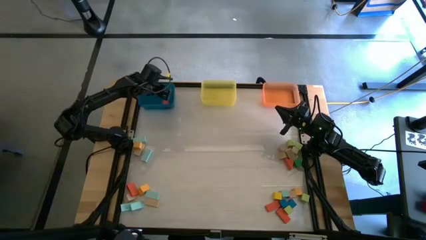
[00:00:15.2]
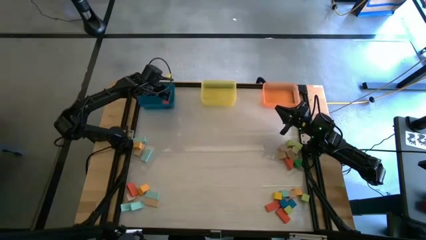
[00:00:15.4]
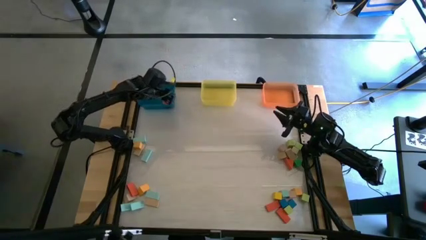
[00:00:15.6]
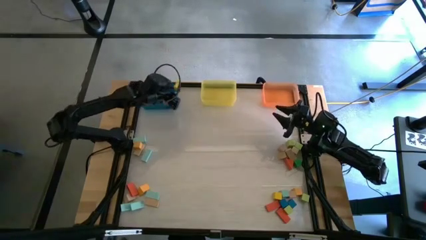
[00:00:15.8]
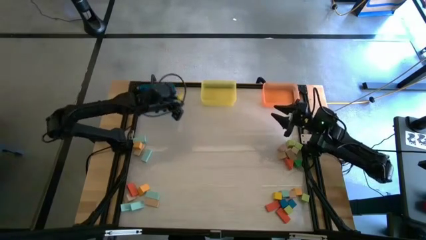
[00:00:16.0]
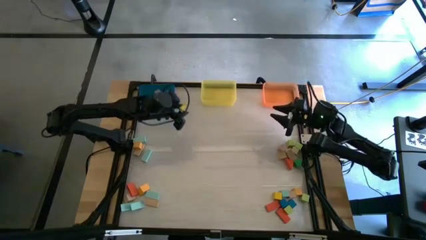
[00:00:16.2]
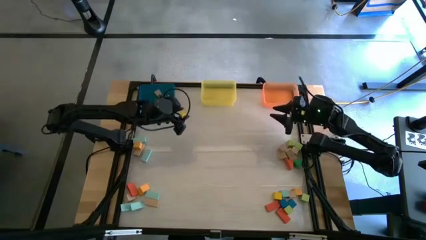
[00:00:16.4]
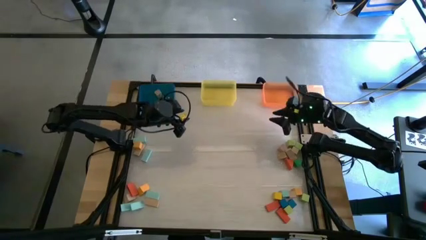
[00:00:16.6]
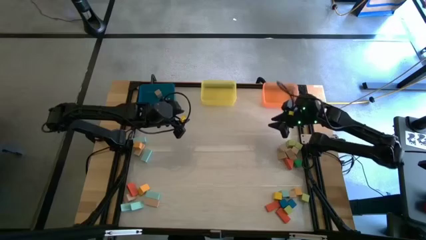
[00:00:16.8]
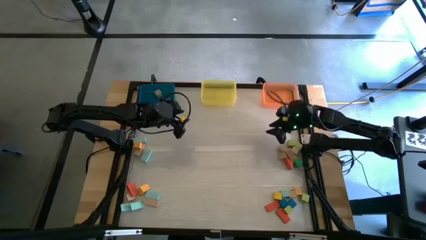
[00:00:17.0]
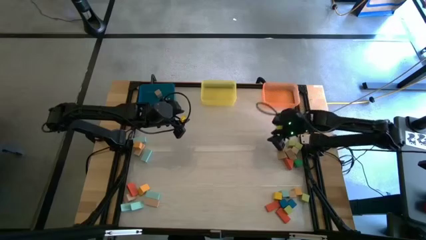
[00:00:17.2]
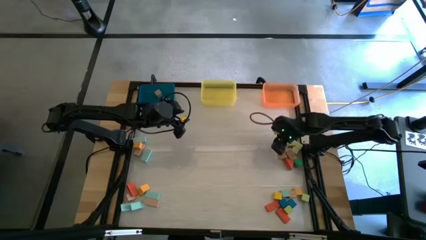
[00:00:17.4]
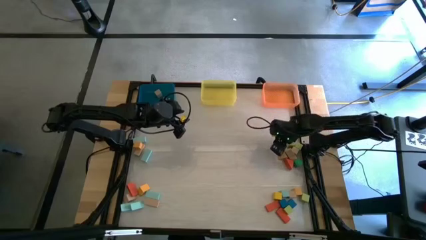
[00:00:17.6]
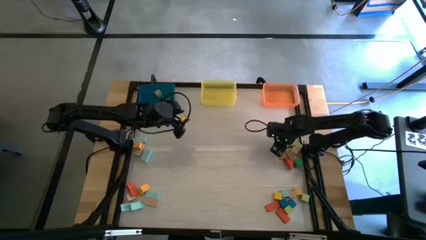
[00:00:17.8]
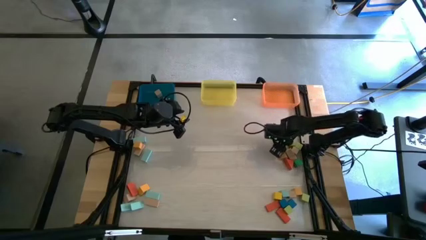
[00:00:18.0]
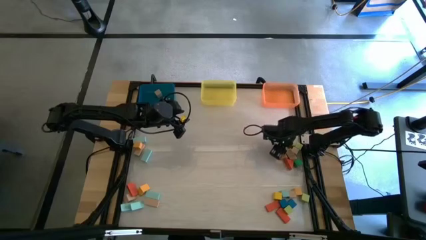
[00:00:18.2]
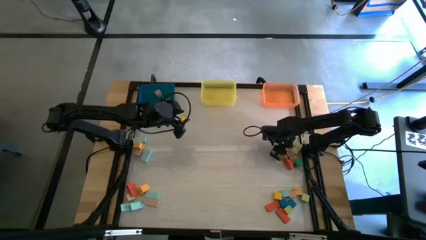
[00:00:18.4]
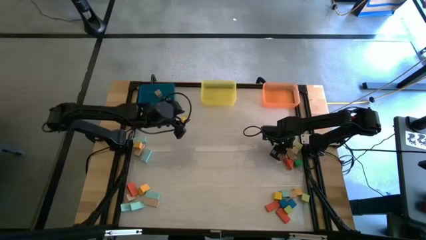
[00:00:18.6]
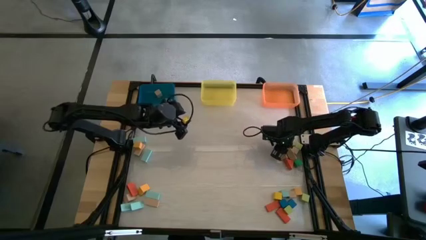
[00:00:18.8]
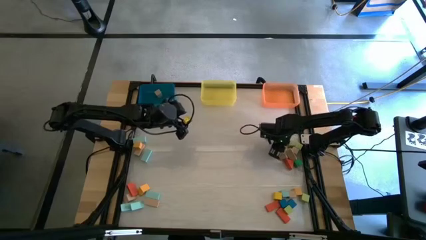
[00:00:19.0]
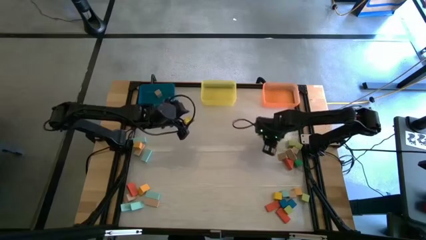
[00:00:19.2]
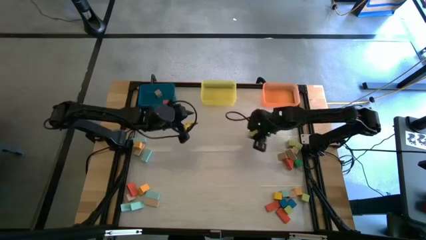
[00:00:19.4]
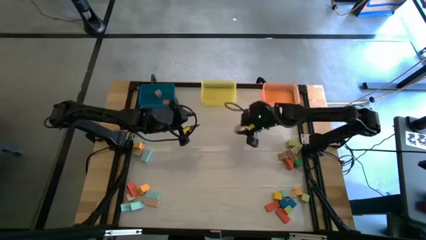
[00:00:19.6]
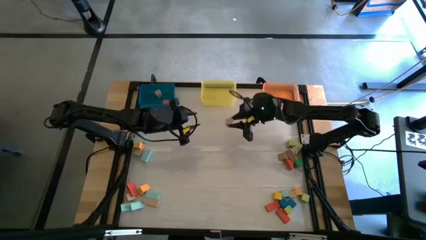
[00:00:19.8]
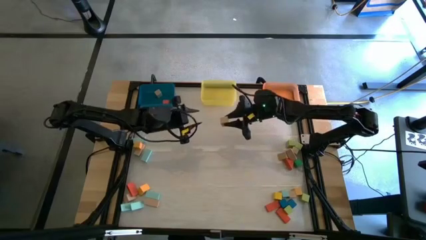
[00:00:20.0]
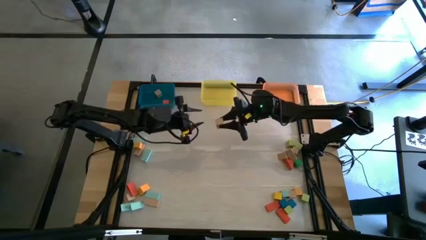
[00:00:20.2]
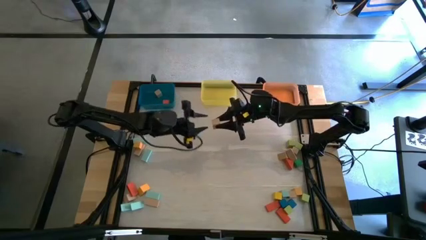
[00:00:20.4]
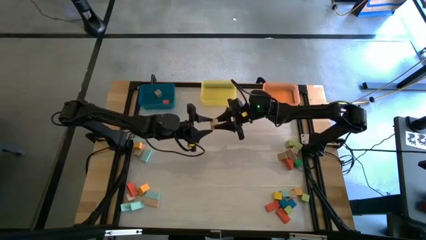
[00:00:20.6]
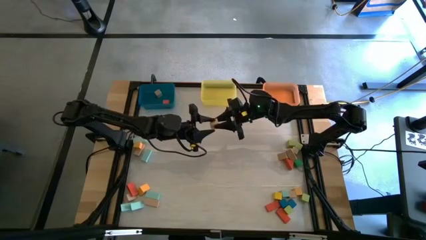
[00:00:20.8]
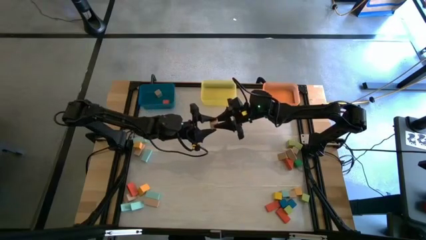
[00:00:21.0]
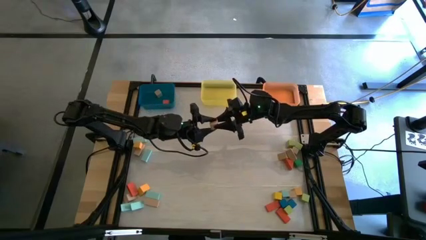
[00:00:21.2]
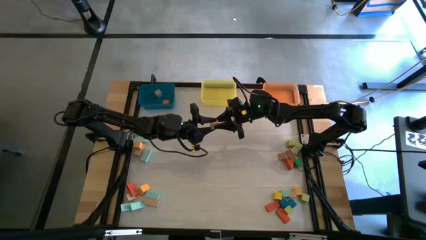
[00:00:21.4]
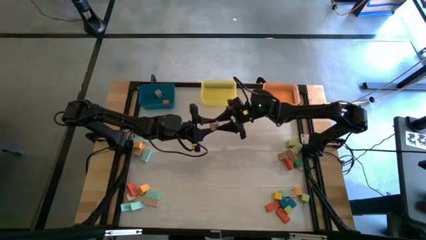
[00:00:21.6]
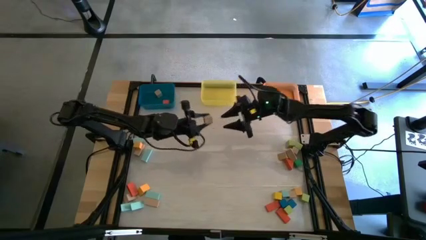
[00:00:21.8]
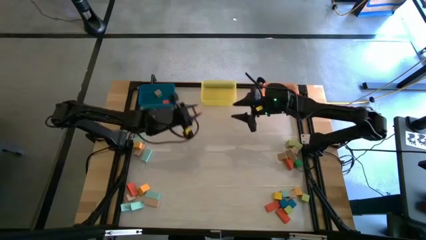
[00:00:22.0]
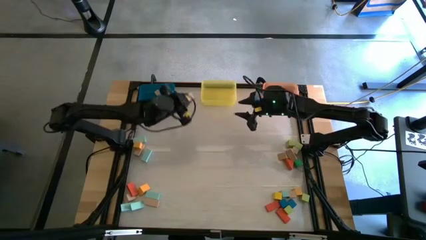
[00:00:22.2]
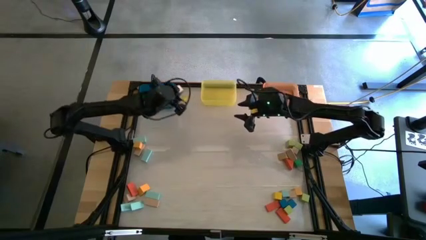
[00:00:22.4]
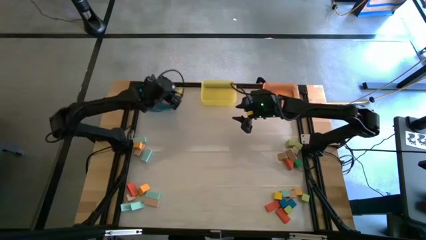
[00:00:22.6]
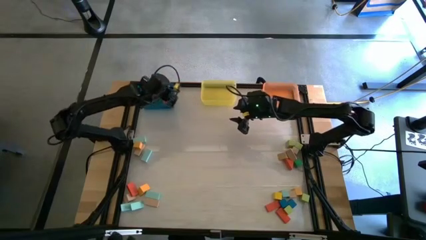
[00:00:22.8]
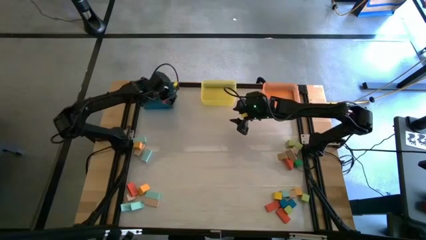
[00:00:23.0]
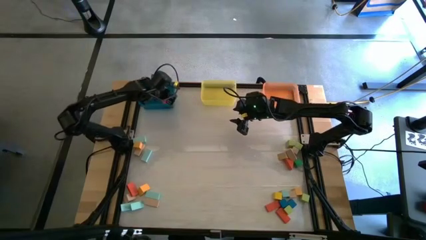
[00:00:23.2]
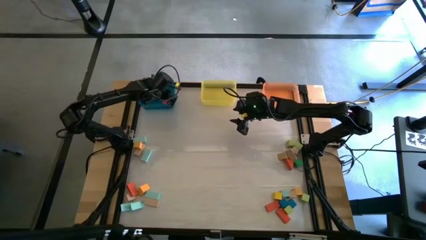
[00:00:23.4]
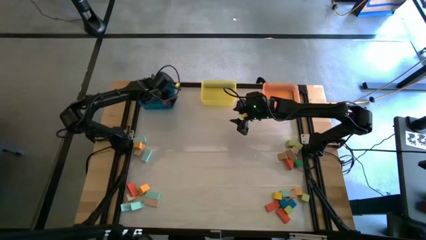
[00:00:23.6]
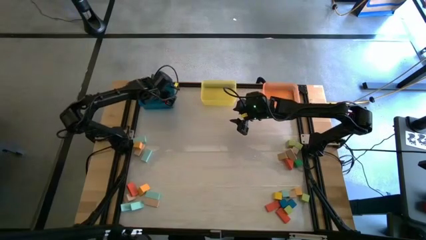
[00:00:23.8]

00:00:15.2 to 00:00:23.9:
Task: Sort blocks by size
Put the brown square block into the blue bin

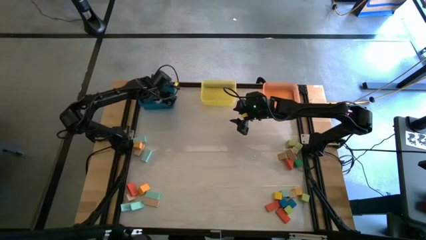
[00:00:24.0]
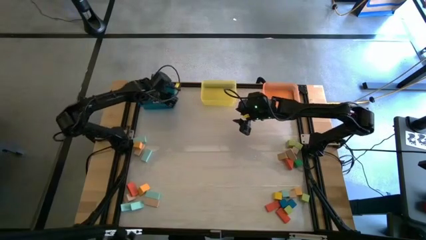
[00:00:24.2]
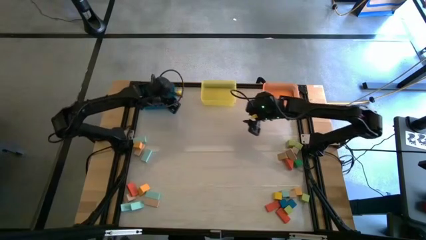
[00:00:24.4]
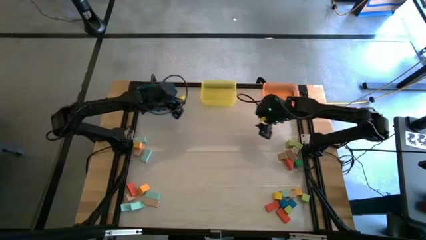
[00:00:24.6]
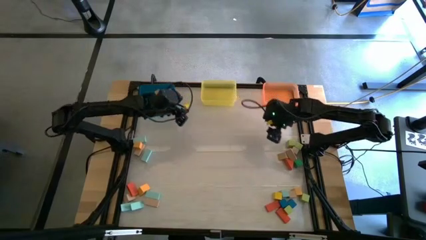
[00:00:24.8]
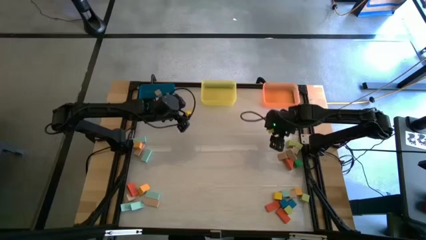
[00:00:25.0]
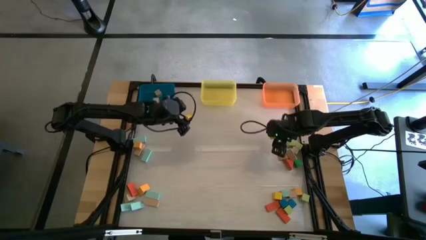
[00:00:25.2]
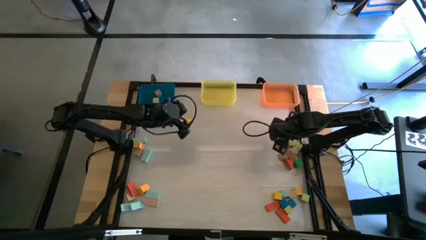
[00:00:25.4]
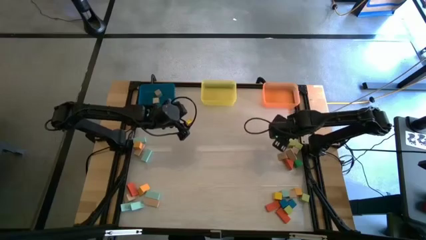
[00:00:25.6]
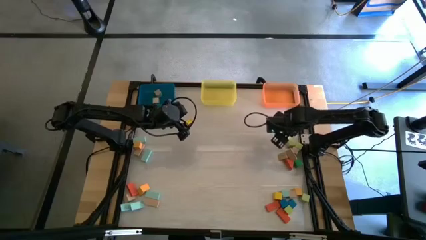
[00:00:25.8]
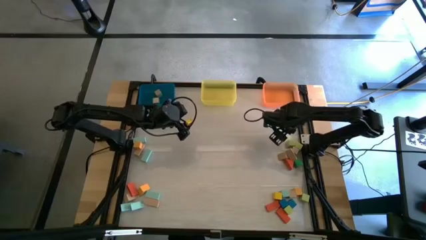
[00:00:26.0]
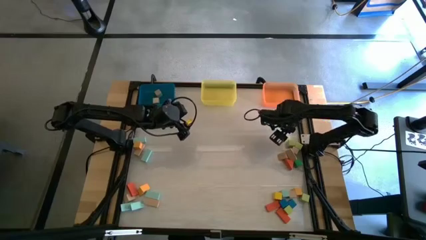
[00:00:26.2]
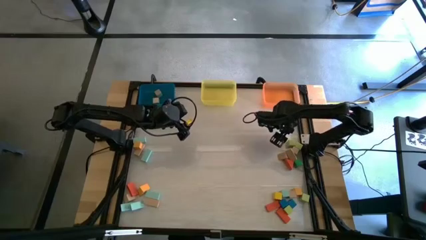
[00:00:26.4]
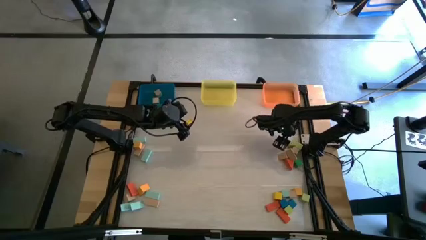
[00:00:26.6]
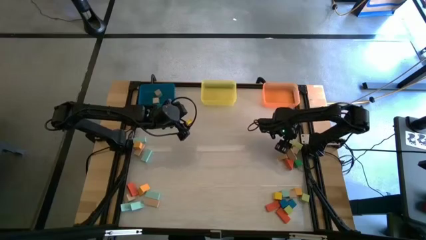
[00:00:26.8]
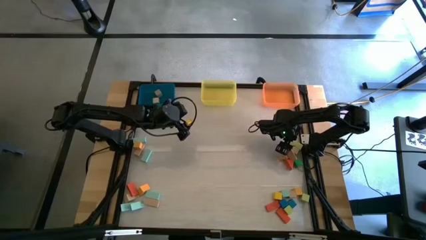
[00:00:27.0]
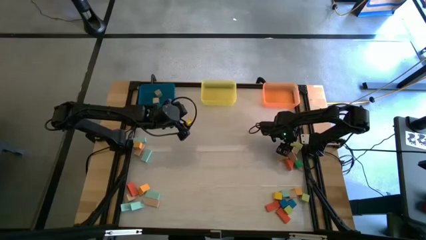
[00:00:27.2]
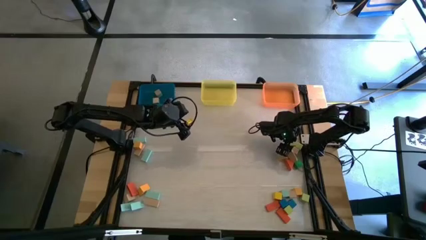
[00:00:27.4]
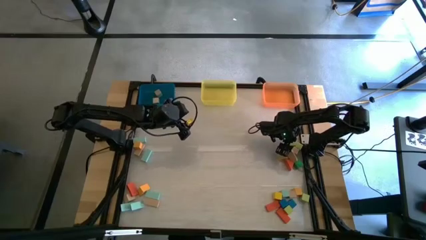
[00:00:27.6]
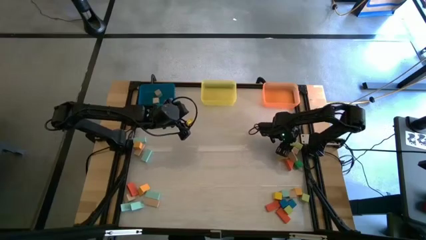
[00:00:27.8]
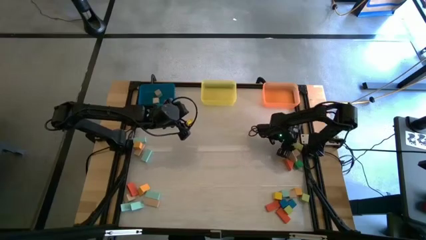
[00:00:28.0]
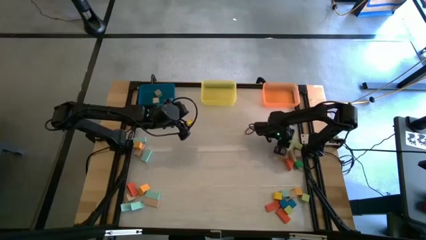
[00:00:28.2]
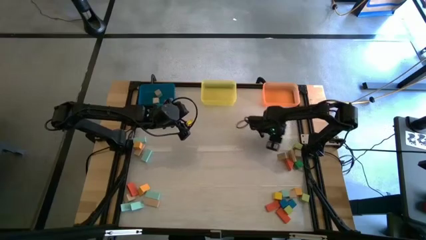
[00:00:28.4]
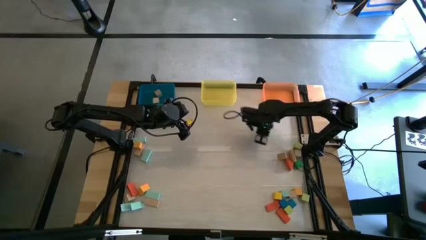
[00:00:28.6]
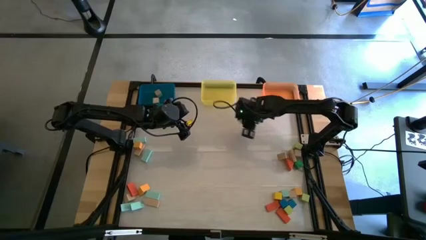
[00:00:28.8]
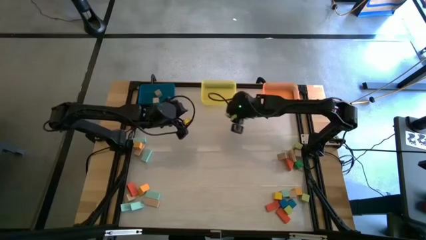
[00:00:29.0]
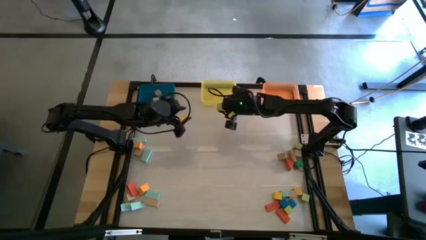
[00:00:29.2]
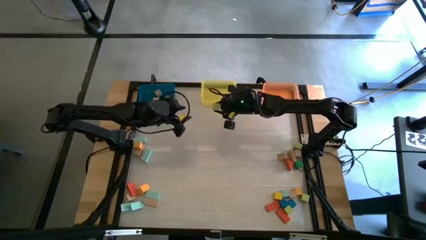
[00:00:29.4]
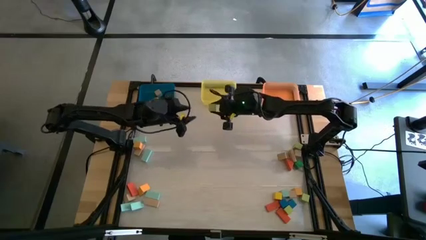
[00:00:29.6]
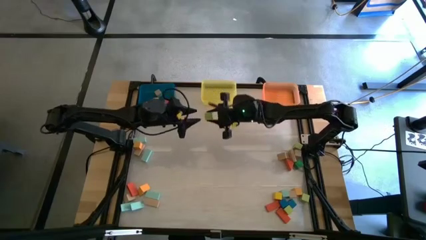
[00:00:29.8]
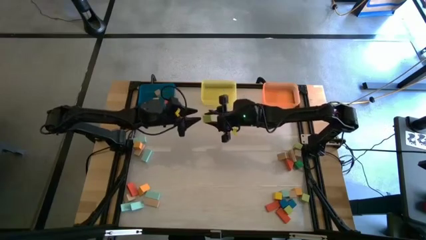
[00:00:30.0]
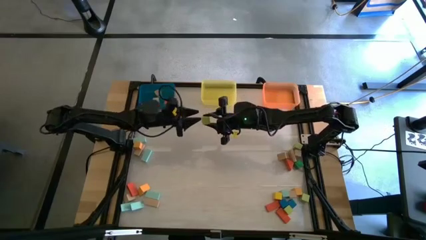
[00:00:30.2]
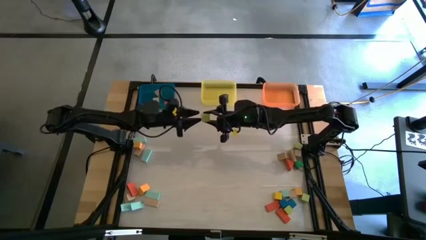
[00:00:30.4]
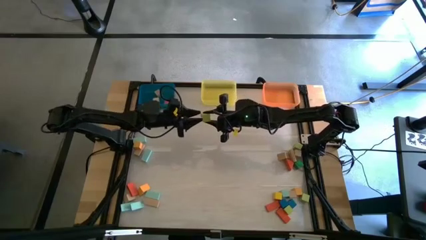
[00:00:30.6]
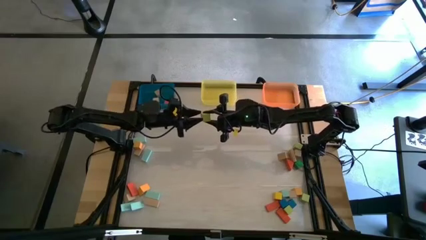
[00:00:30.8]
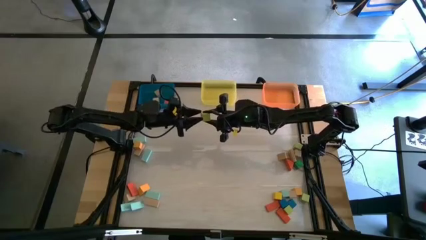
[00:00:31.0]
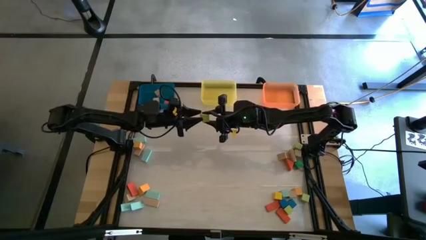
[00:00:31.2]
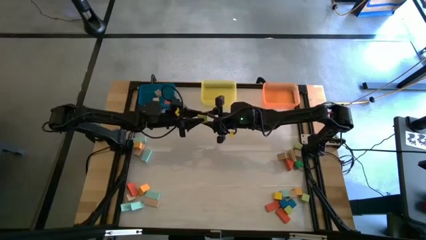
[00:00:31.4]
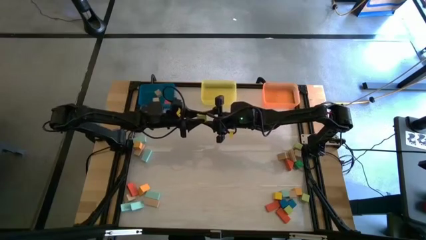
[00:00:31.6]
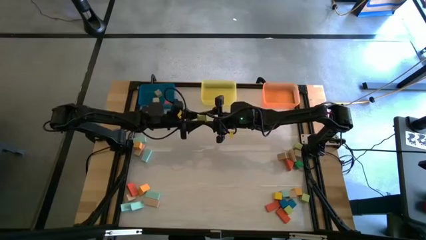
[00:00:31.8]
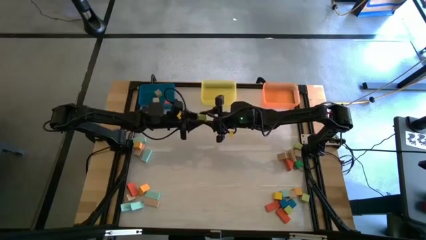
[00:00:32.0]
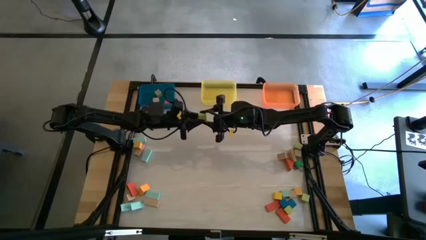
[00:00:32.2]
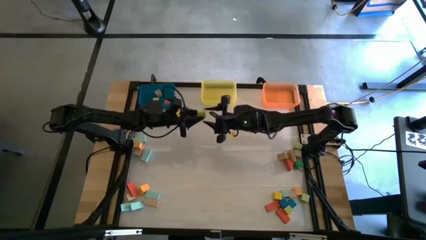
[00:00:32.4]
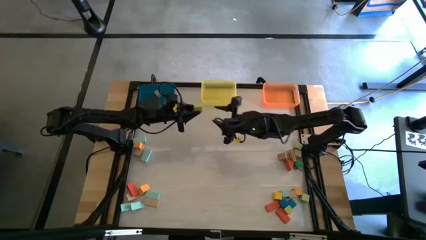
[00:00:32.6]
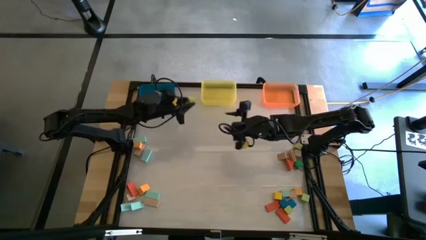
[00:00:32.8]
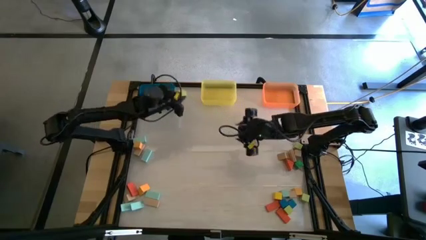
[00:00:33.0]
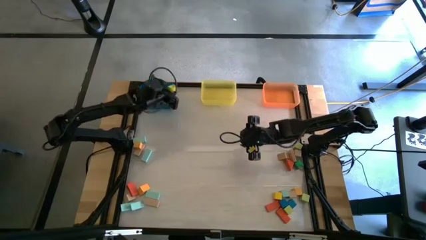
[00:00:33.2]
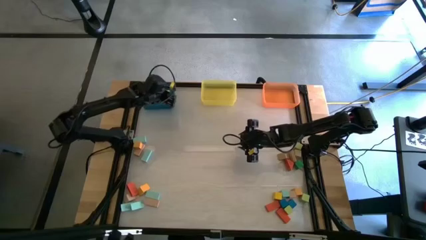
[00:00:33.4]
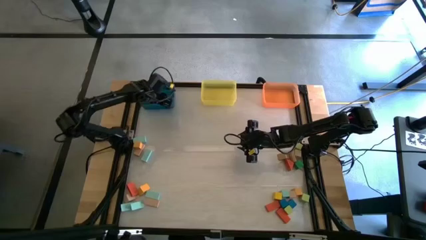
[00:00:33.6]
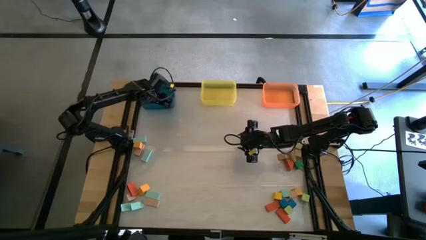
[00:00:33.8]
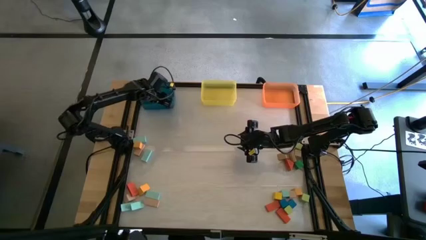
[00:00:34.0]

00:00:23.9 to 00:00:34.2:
Put the light green square block into the blue bin
